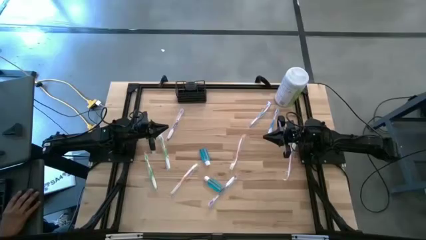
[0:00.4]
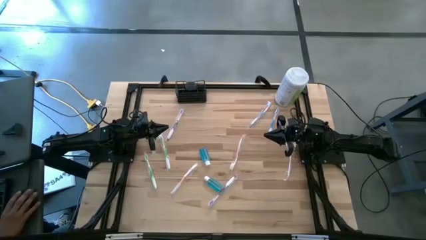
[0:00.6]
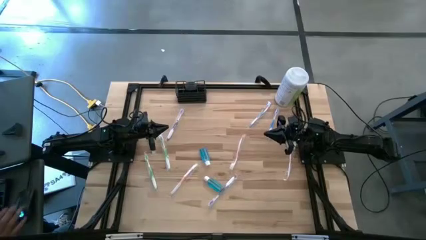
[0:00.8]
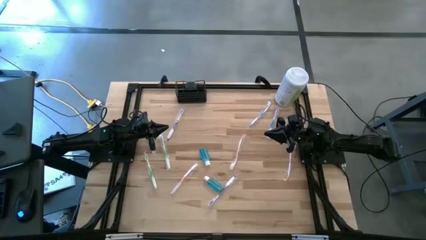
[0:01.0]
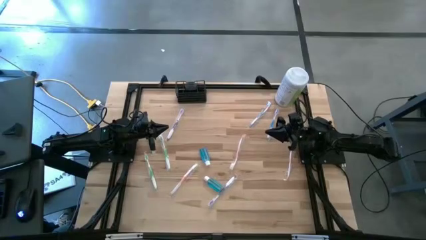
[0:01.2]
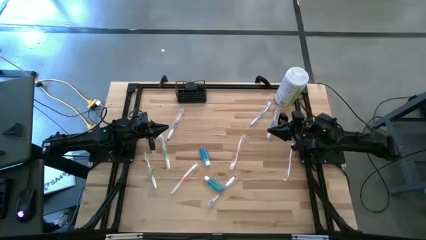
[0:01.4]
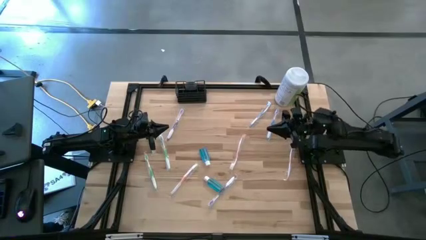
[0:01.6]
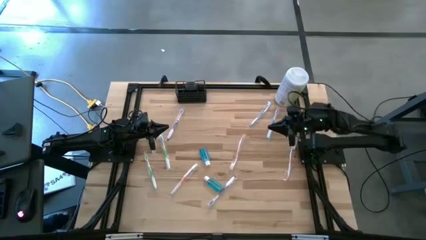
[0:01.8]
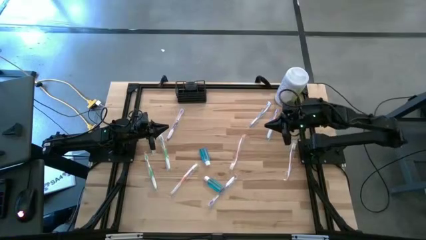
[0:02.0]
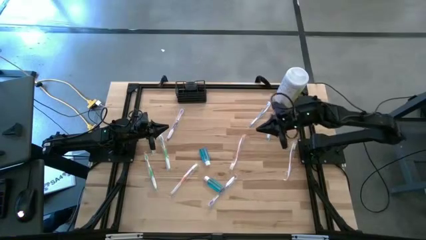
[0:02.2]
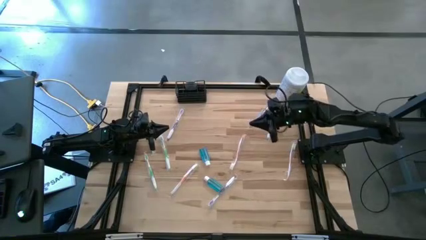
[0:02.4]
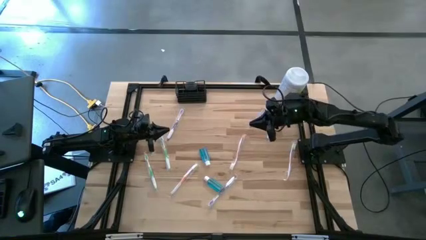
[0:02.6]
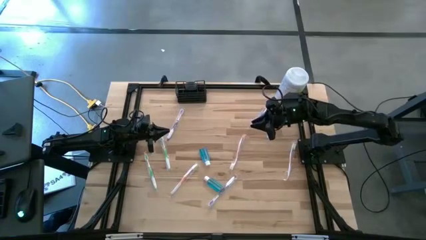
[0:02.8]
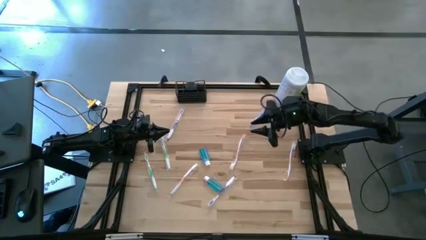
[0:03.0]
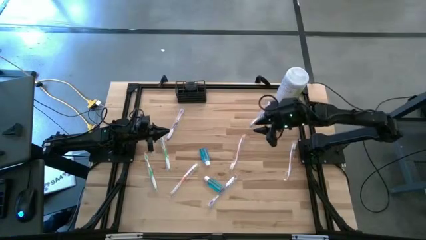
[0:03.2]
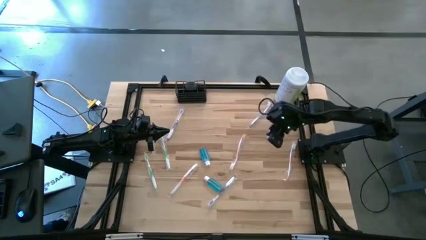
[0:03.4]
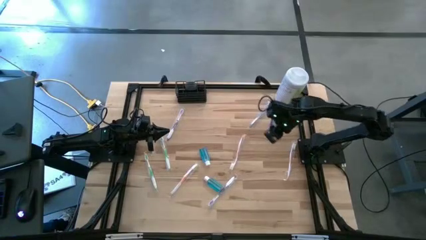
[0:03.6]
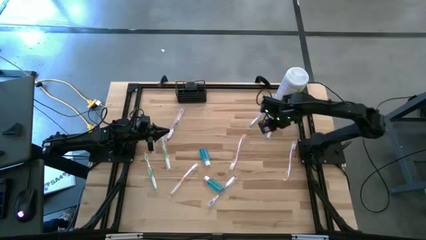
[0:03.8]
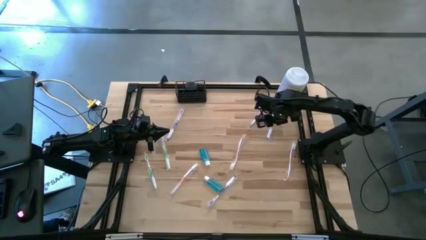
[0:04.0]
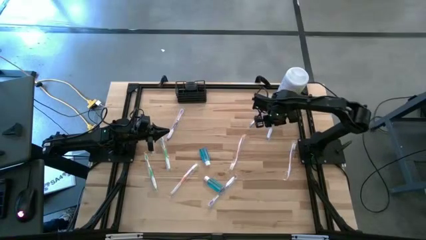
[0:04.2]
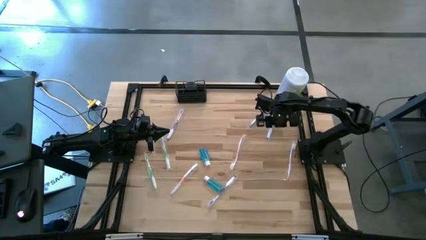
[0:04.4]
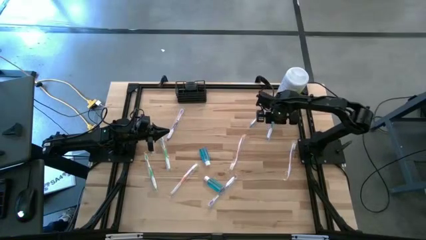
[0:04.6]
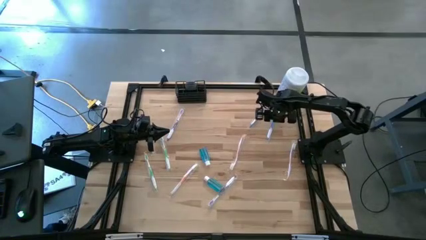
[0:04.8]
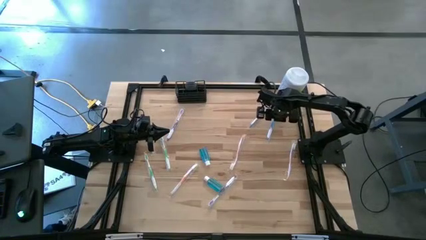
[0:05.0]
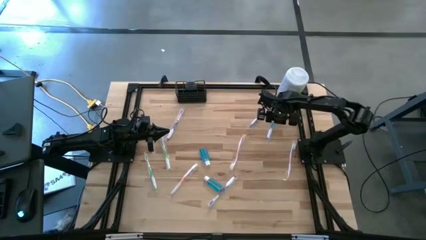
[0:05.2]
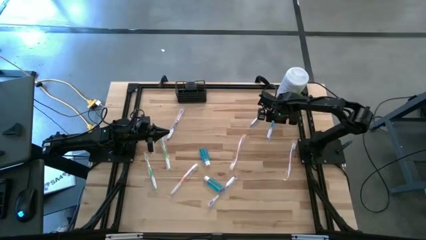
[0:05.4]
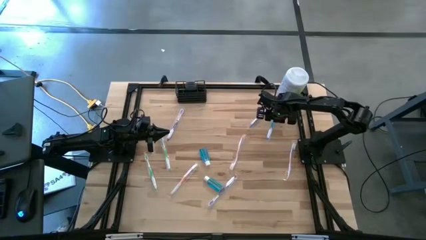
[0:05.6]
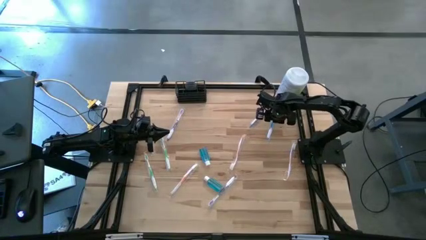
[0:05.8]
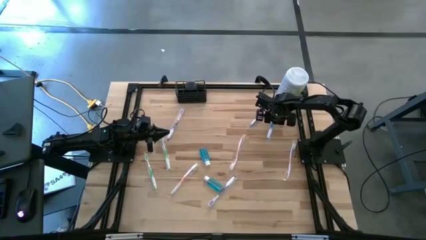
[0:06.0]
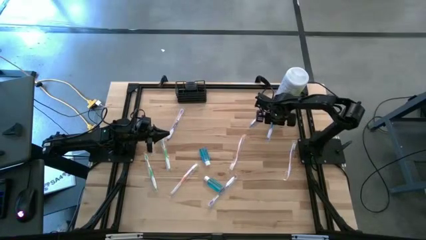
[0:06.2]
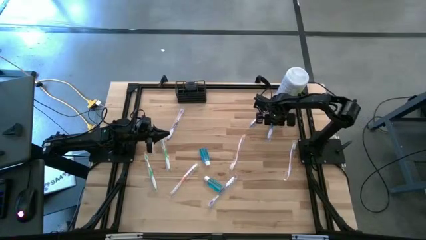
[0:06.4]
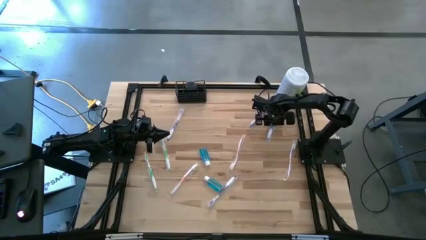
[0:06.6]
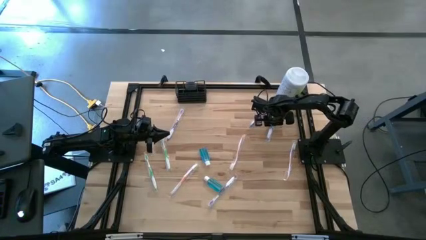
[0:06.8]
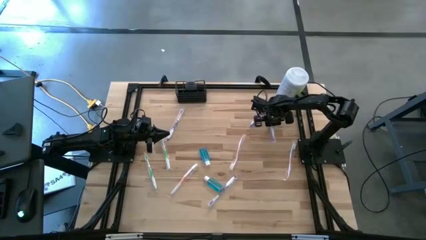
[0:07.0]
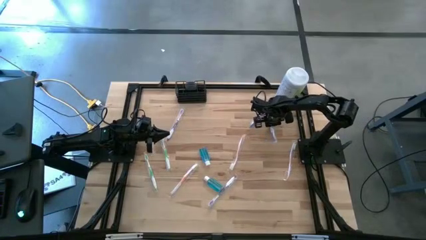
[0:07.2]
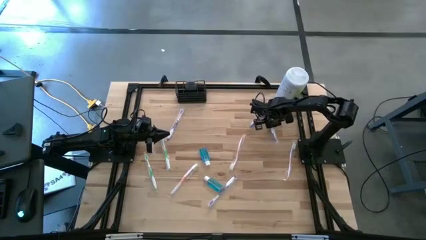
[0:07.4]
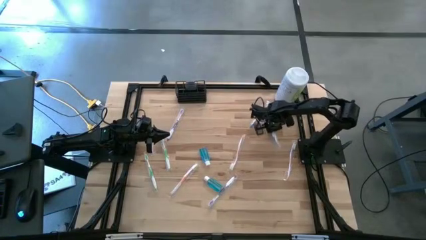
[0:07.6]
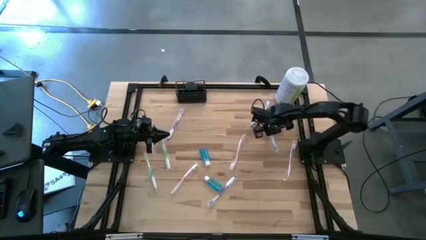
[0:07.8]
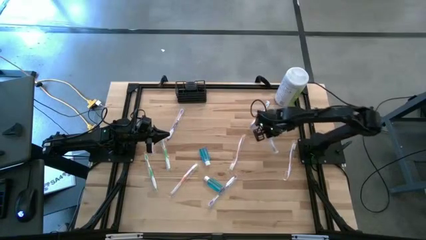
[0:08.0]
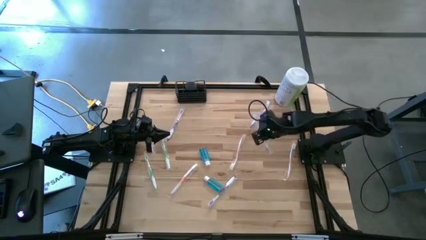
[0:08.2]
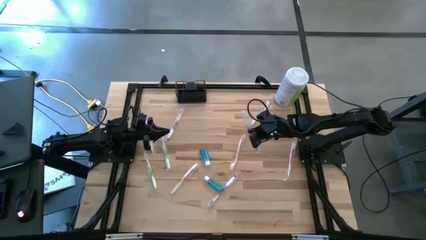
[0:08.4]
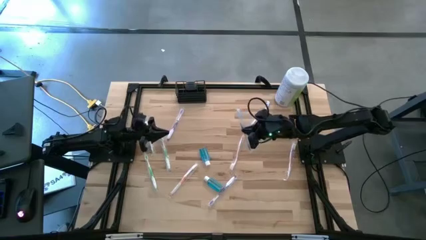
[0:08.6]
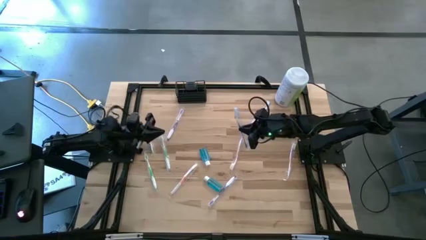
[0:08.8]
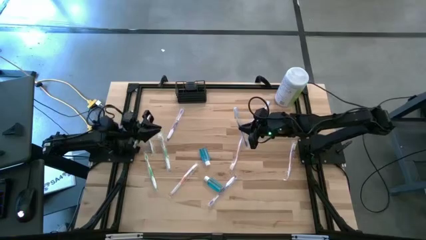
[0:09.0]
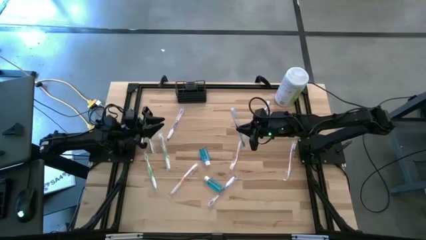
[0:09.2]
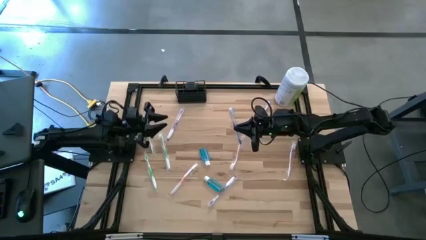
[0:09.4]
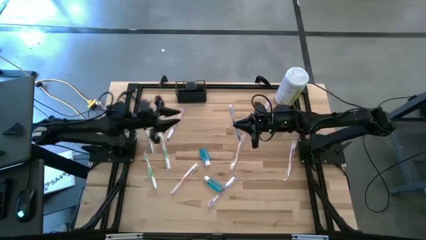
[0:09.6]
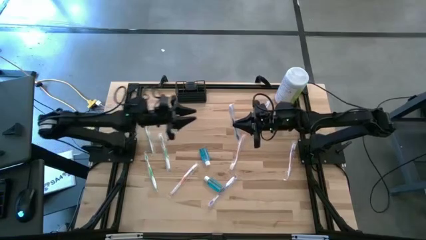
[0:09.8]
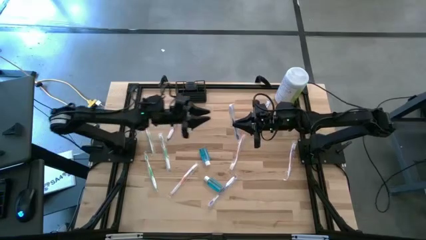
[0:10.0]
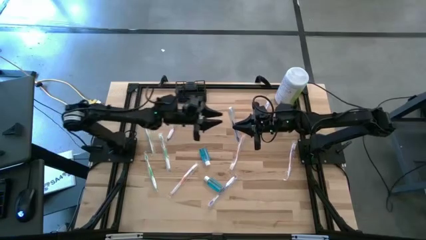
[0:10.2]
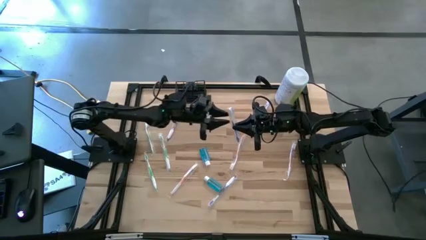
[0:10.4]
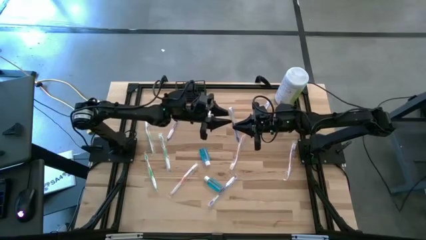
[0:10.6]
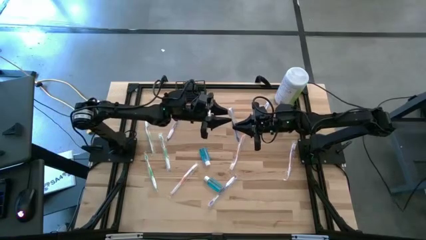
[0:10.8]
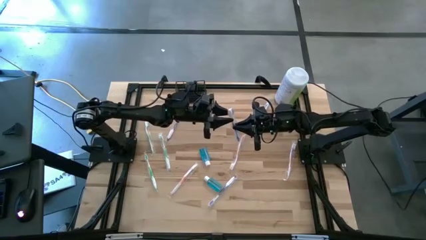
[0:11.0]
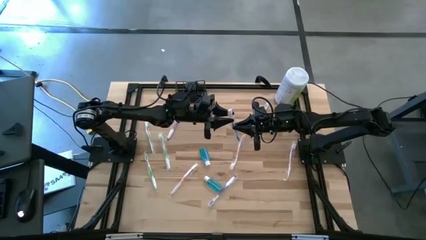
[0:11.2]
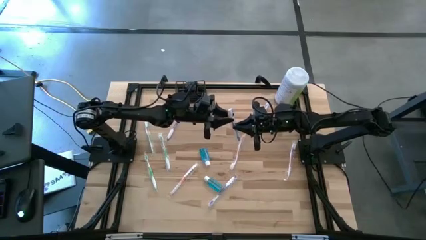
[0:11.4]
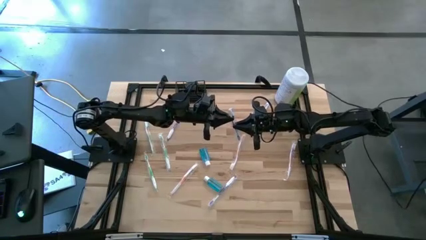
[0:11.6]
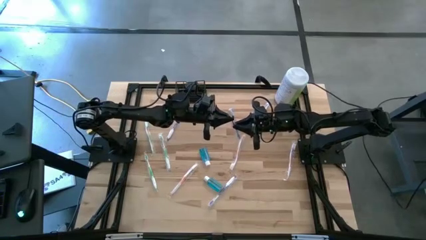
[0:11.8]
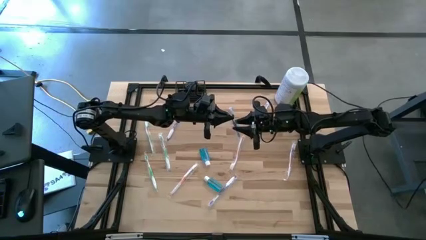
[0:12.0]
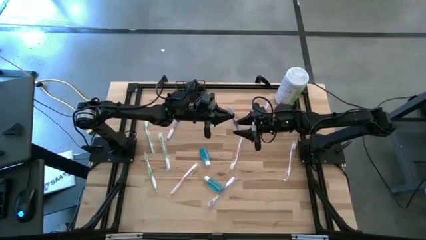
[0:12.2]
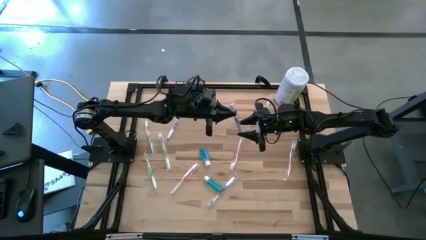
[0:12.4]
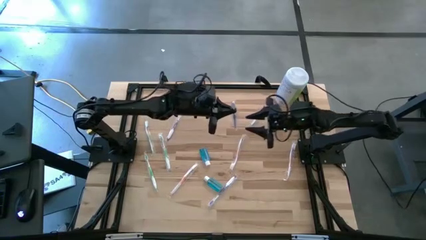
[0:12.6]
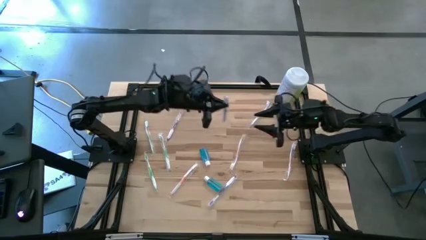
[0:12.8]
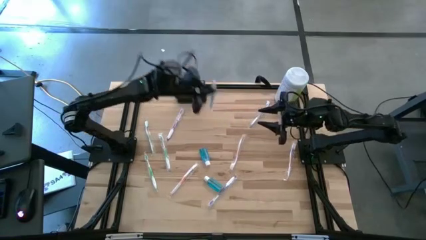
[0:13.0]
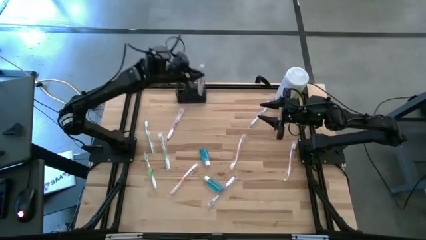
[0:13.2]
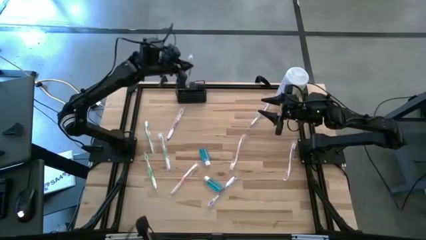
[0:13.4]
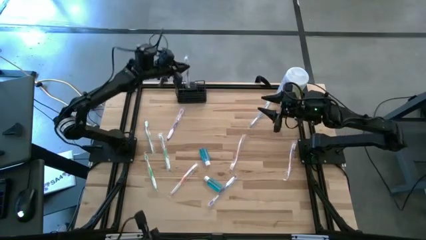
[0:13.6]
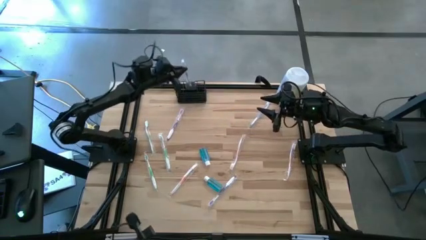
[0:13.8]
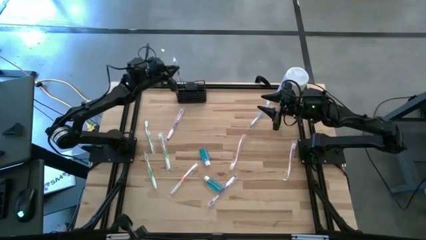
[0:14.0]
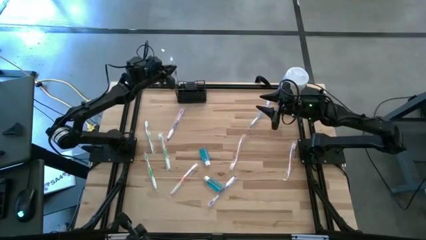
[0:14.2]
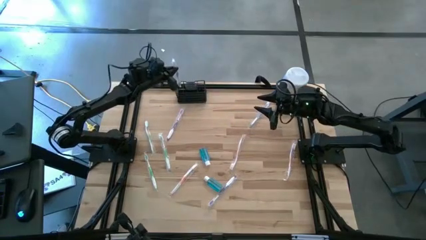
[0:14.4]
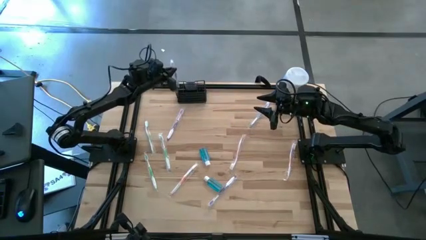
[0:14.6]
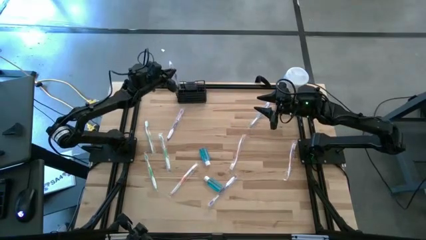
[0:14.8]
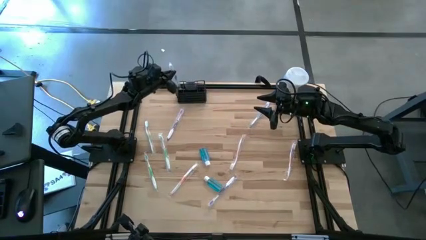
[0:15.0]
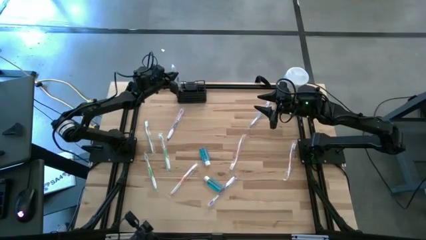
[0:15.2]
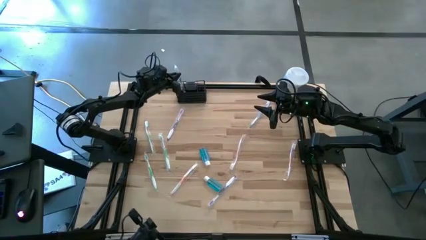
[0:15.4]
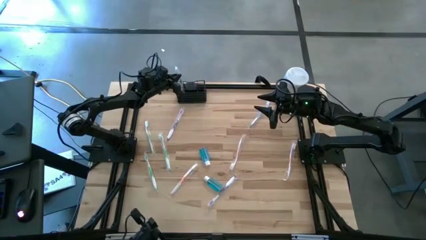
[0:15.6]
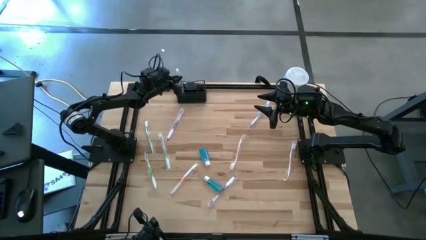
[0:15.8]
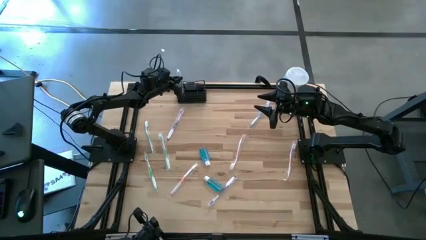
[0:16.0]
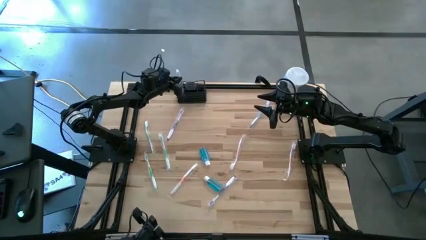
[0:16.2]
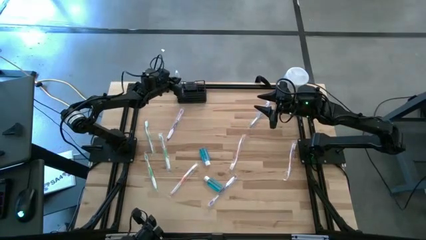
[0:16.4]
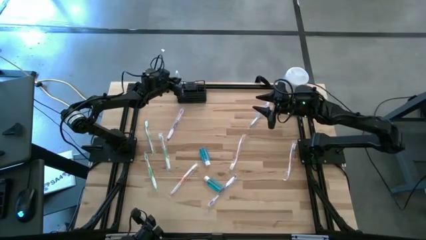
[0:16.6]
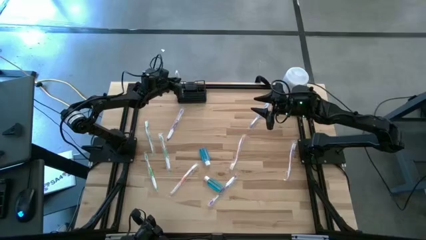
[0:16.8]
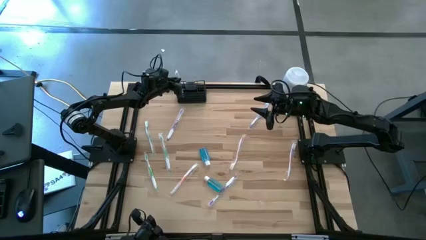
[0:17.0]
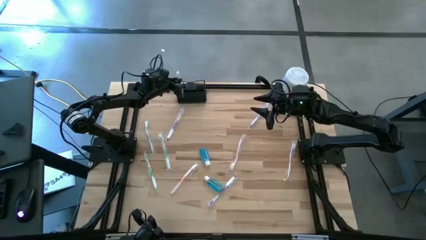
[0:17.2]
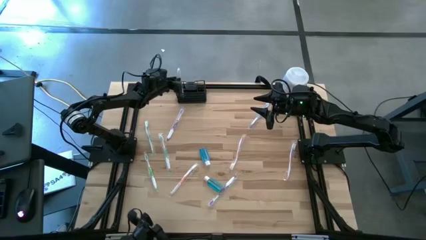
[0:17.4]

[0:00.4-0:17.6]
Task: Pick & Place toothbrushing station
Put the right blue toothbrush into the black wire organizer
